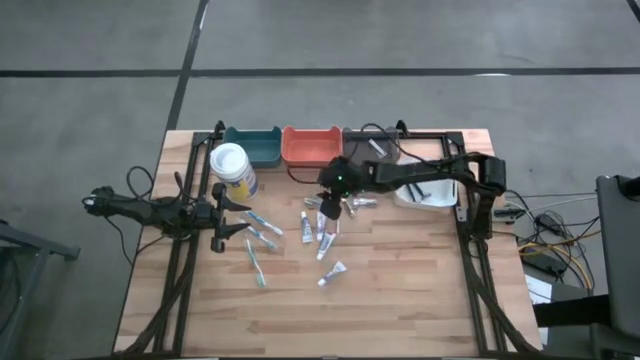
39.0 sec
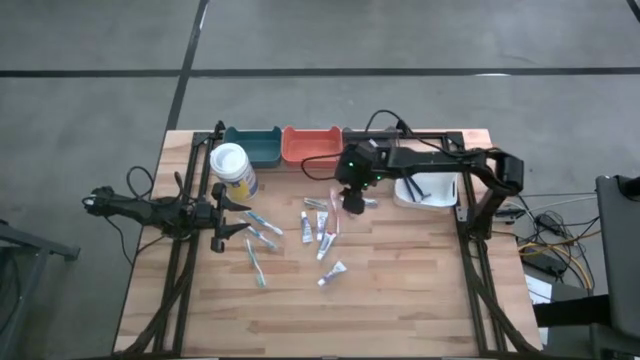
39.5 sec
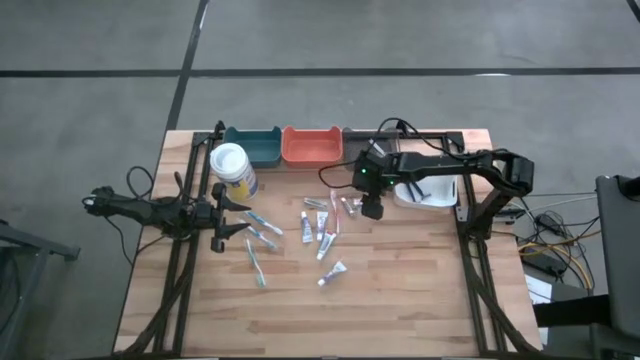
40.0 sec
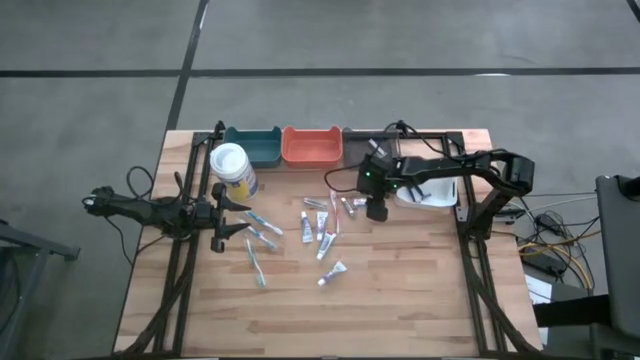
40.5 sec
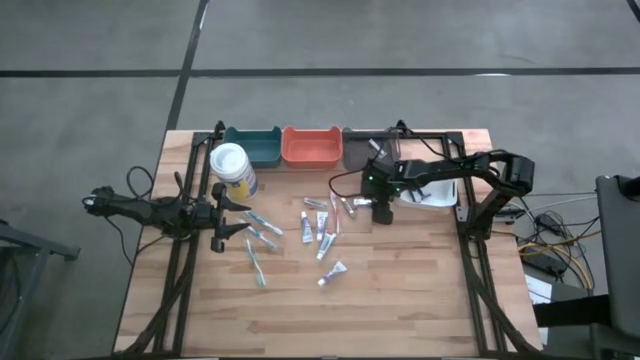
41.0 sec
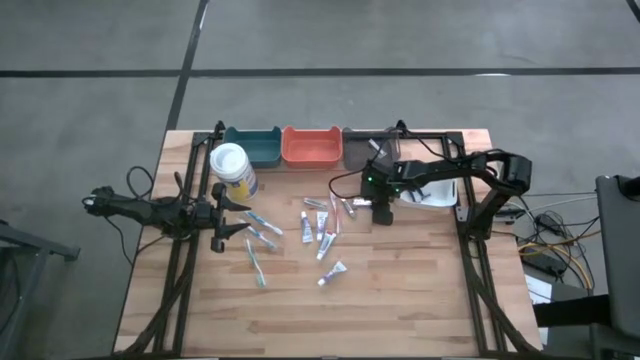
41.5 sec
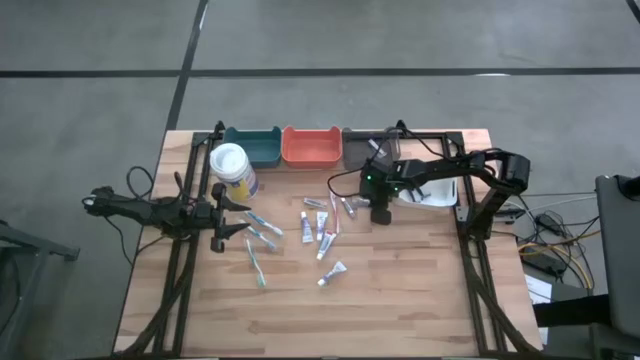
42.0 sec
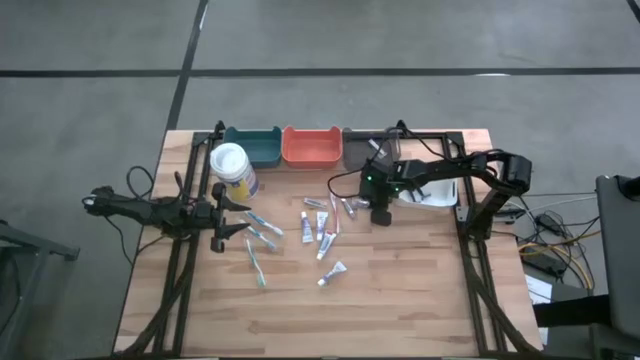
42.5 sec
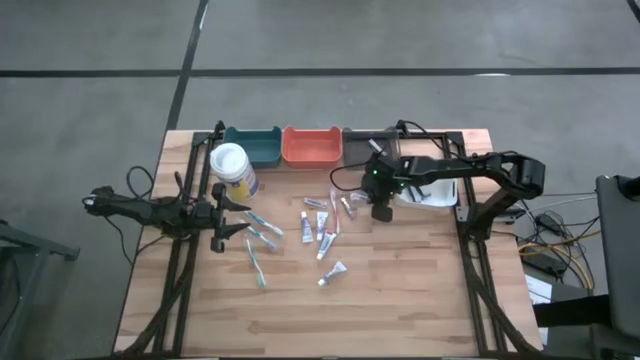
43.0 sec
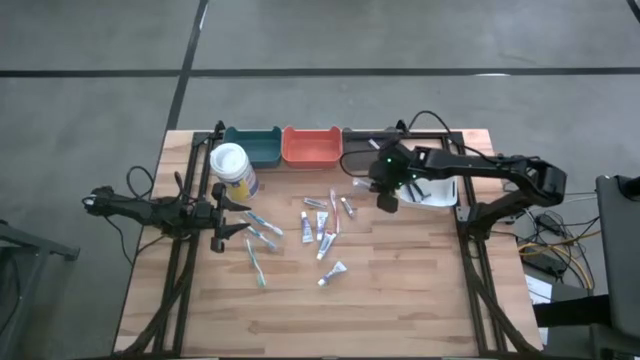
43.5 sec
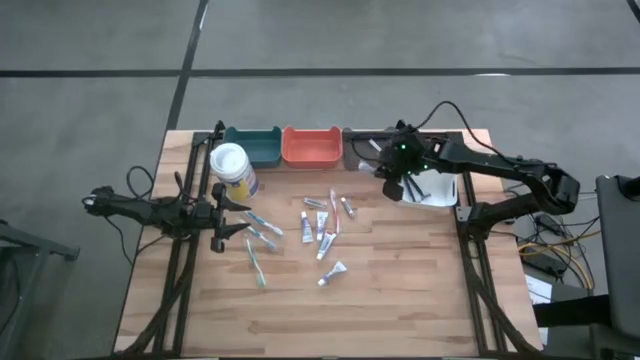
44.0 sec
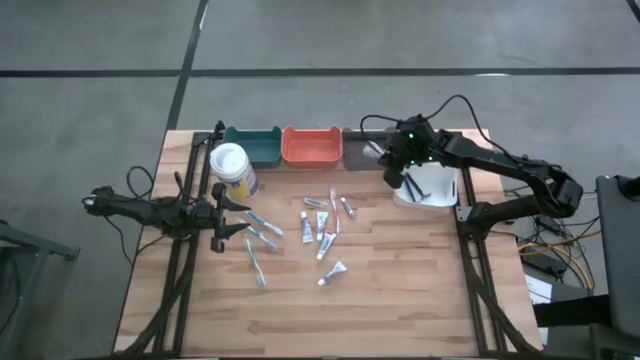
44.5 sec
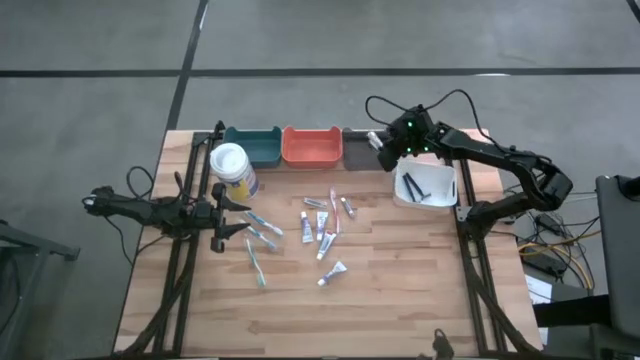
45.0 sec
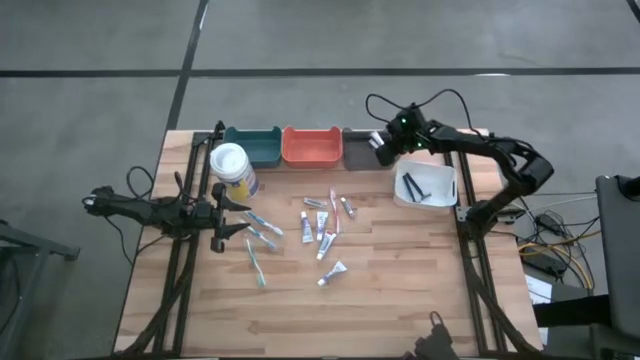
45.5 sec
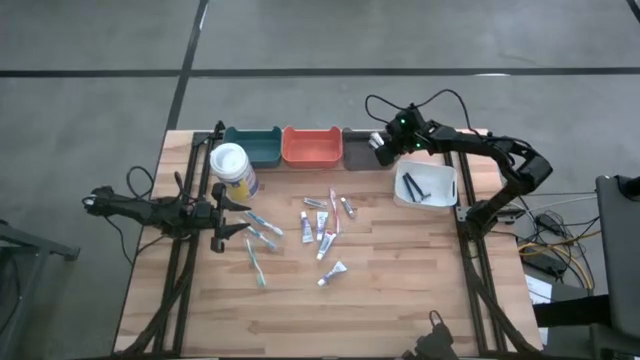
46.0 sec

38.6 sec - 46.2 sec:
Task: Pick & Place Travel size toiletries
Put the right nail cutter into the black bin

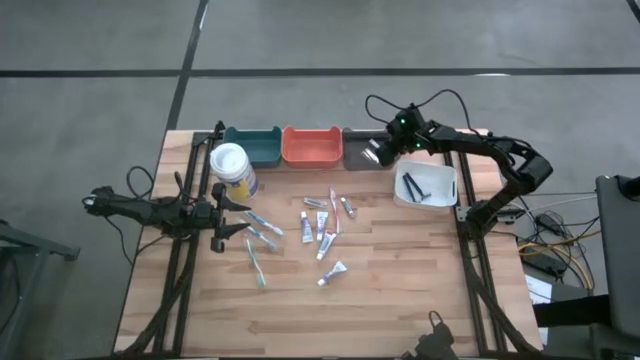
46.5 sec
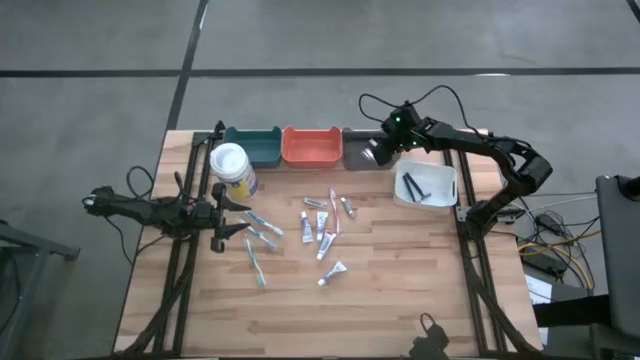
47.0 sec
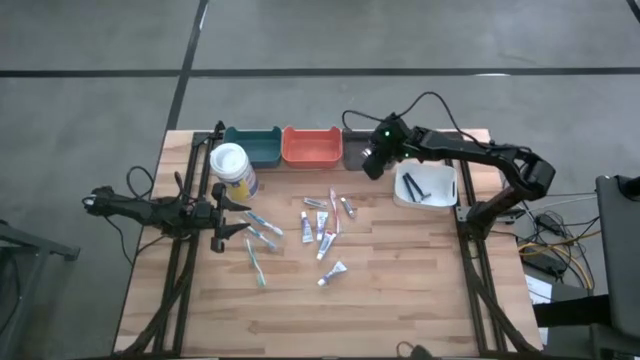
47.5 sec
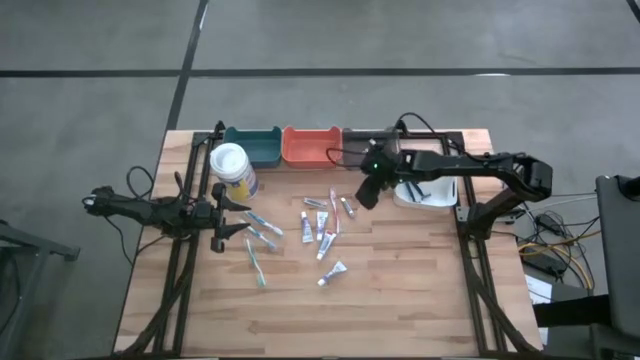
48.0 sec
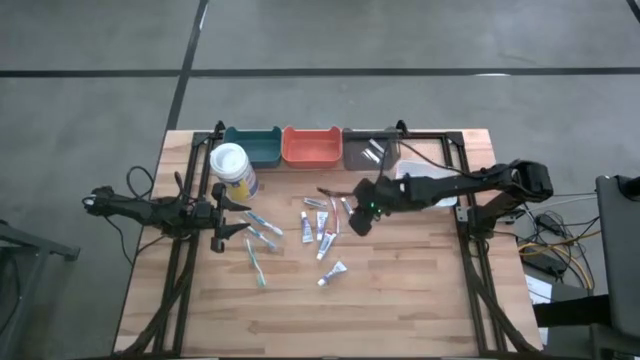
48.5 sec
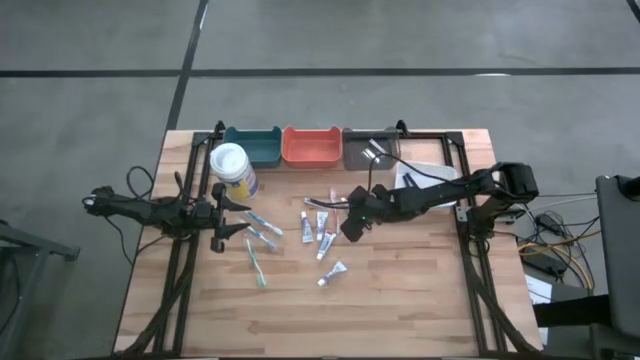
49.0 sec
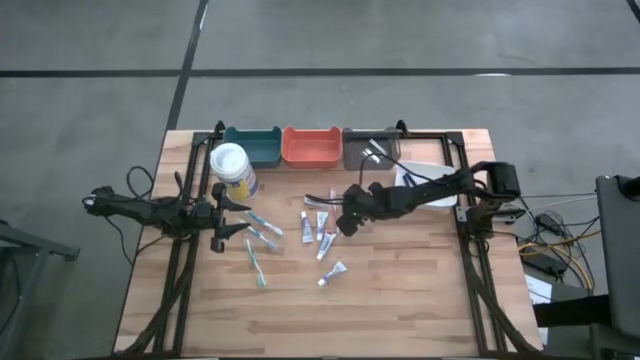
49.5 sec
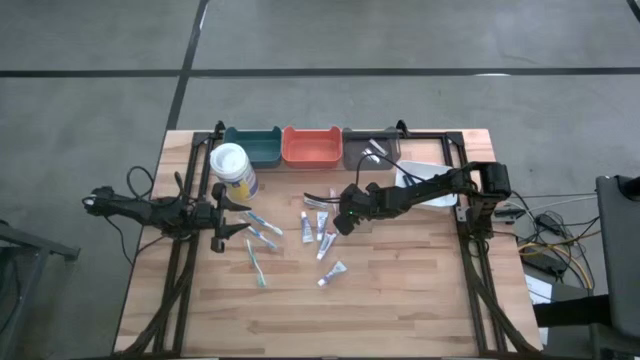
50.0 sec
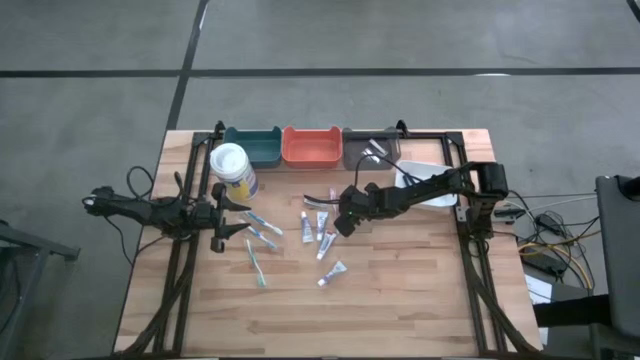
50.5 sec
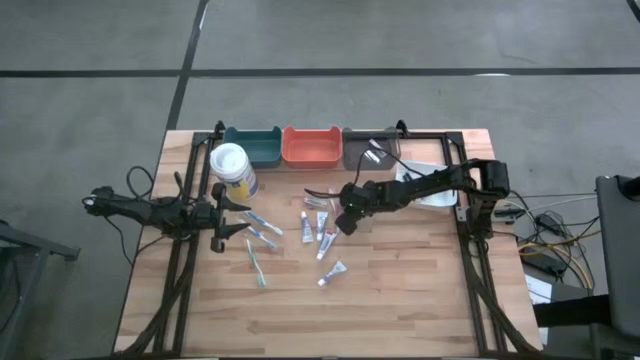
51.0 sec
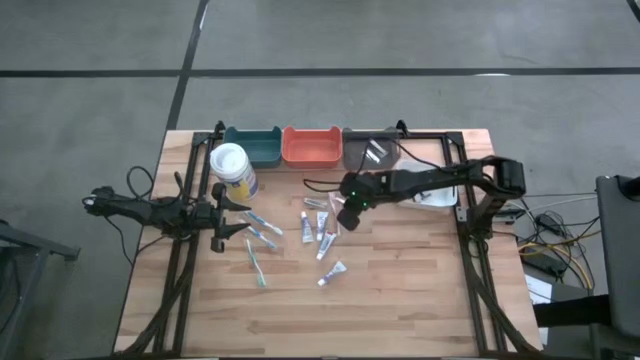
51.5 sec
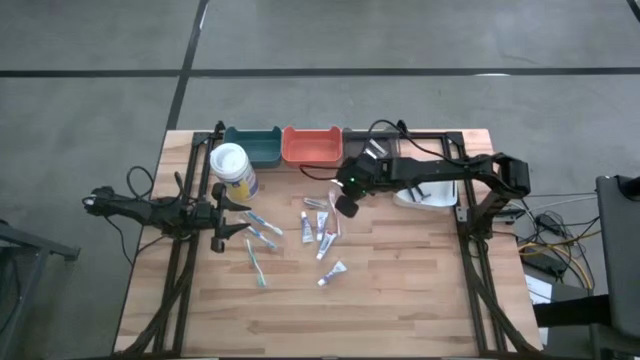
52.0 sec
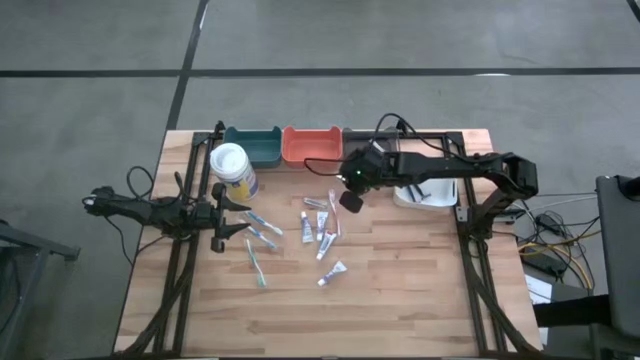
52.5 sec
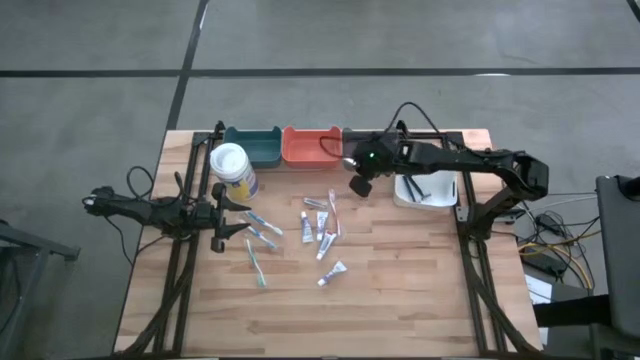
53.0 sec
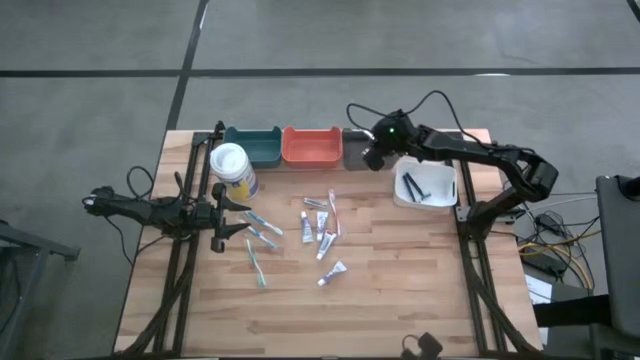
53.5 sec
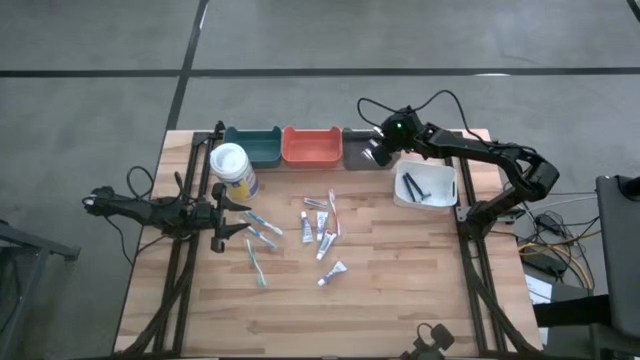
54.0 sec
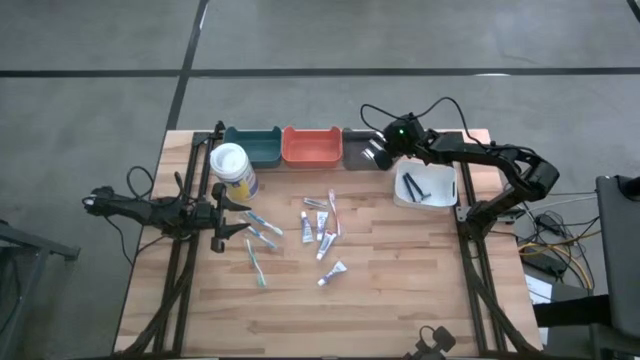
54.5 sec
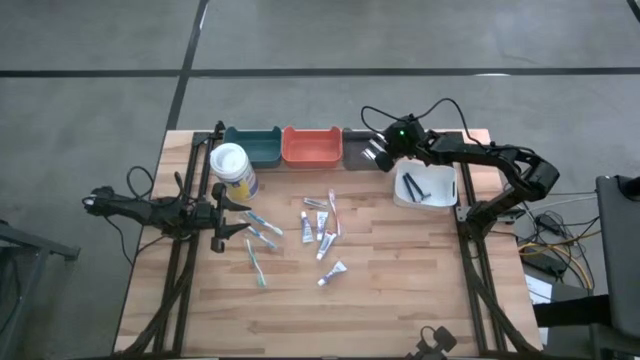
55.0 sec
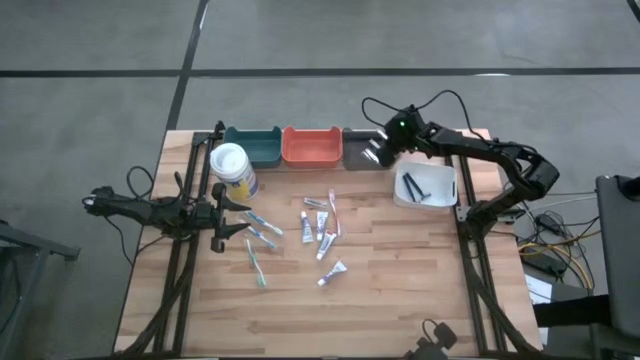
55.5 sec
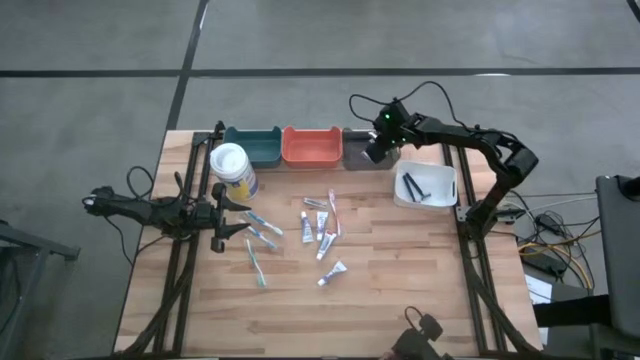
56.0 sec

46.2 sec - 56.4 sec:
Put the right nail cutter into the black bin

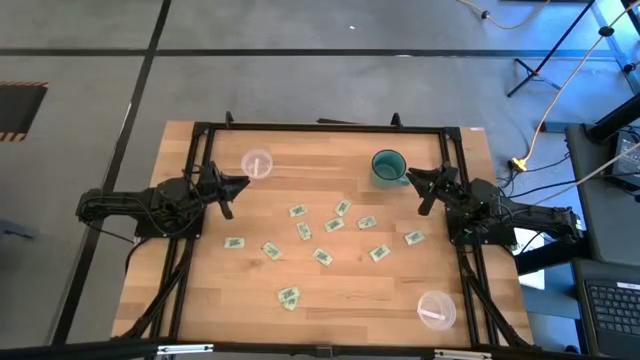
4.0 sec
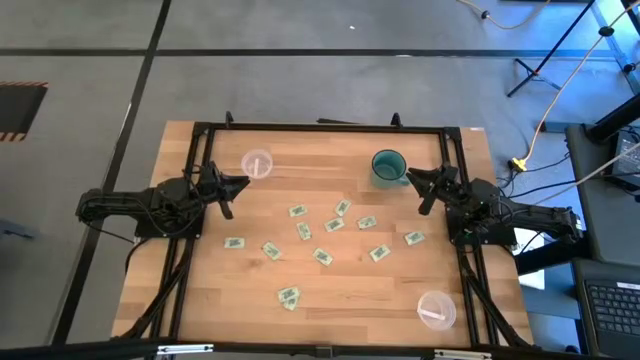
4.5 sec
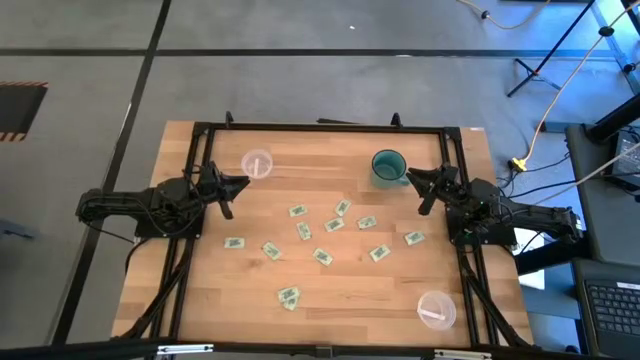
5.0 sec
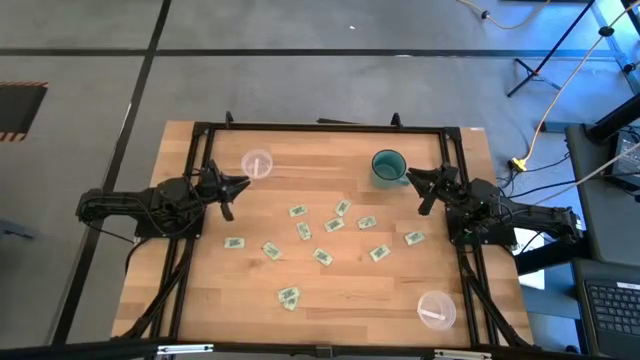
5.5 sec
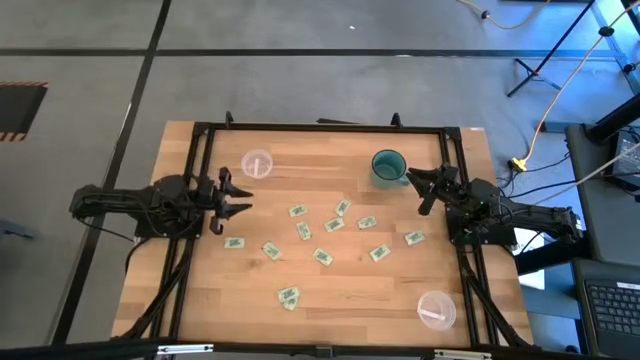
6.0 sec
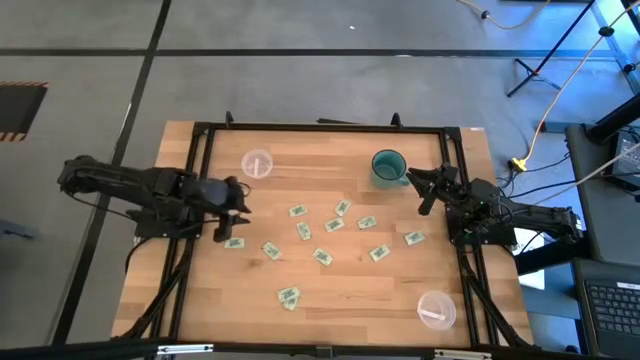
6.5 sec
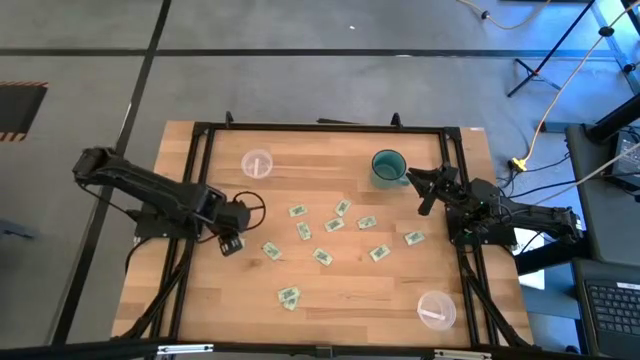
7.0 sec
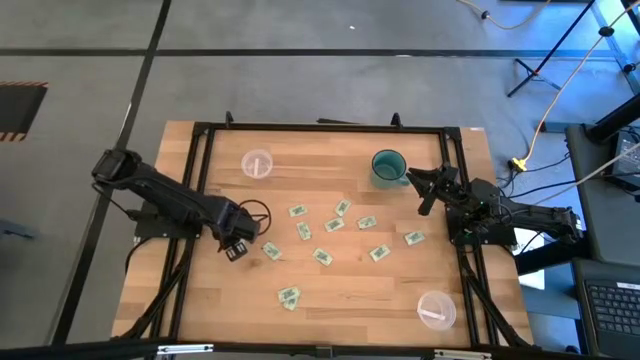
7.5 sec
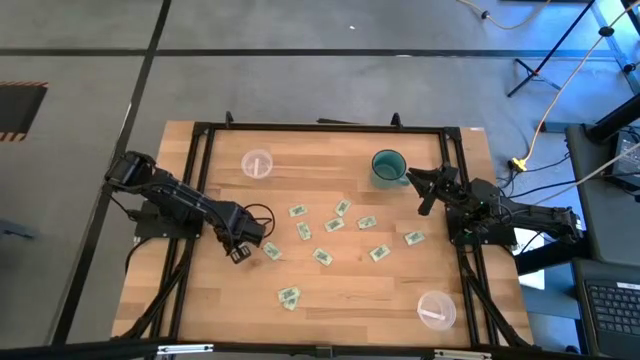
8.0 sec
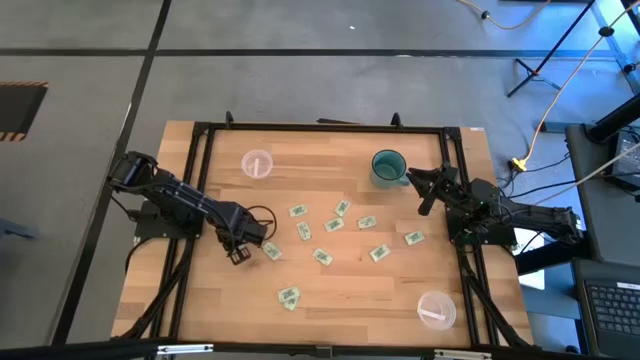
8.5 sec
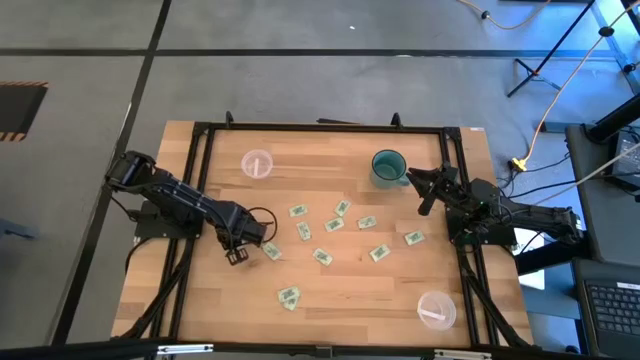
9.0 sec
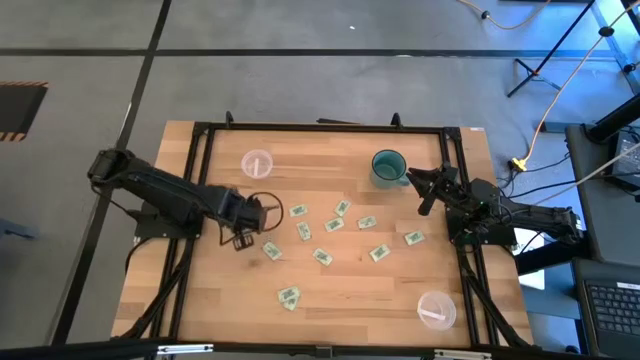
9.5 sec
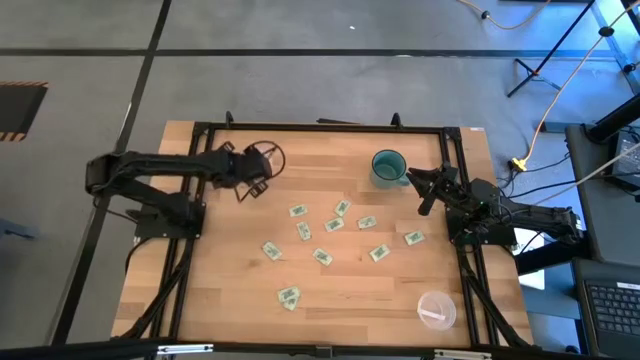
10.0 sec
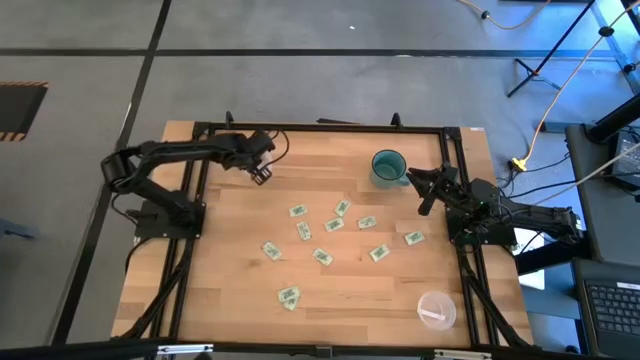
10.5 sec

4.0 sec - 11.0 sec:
Task: Pick and place Stevia / Truvia into bins
Put the stevia packet into the top transparent container
